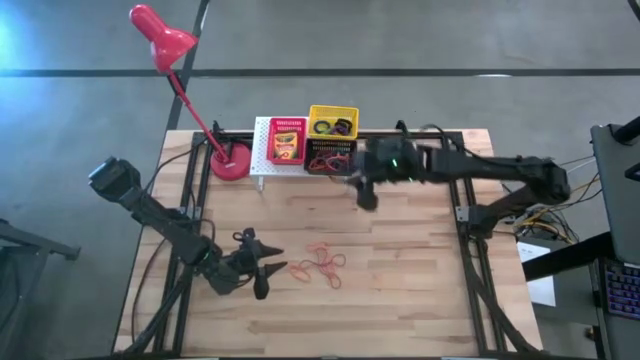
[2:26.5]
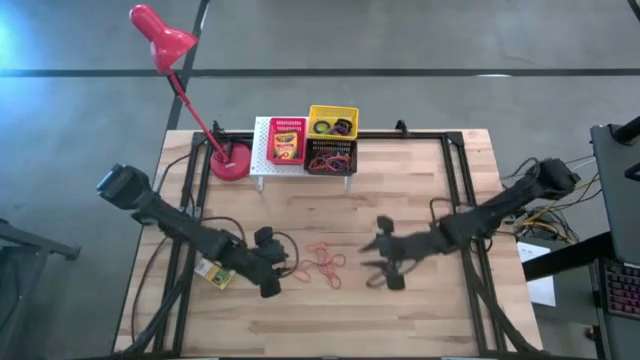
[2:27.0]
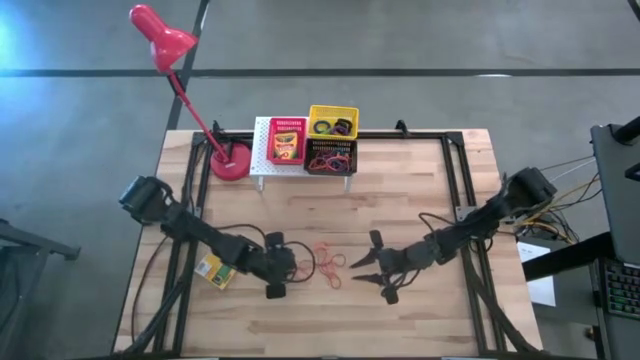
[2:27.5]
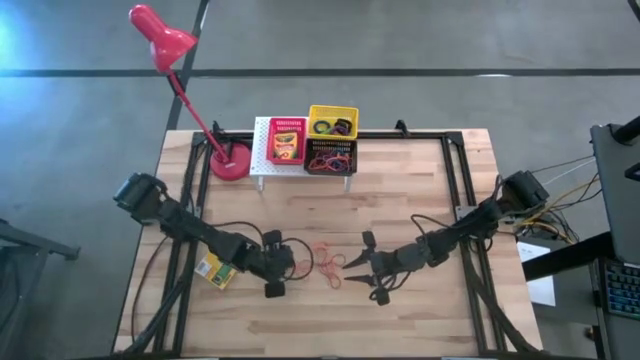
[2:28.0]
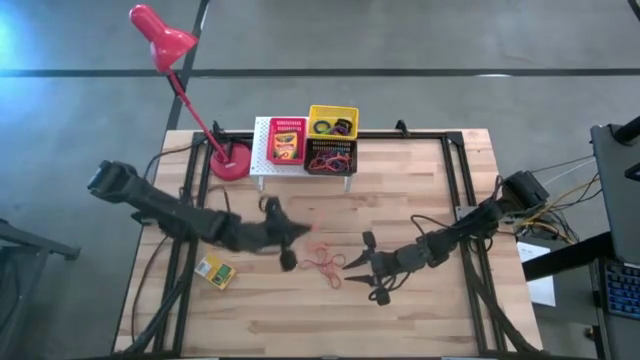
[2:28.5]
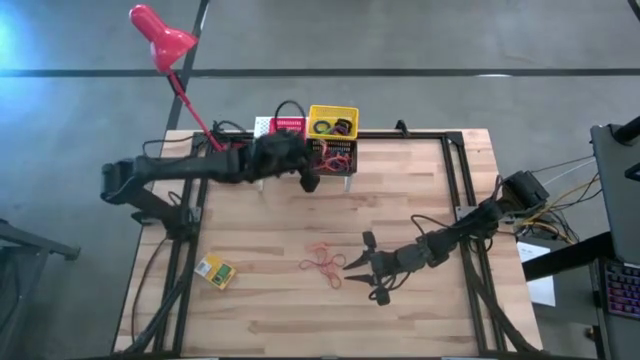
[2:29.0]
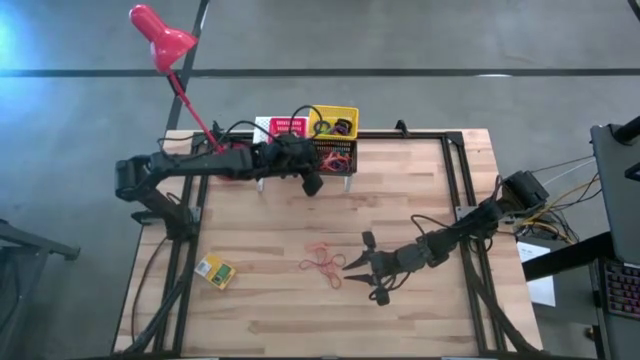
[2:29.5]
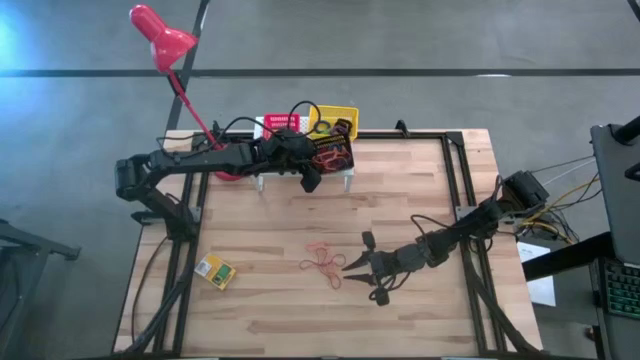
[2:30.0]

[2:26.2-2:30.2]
Task: Pick & Place Office Desk Supplies
Put the orange rubber band into the black bin on the shelf

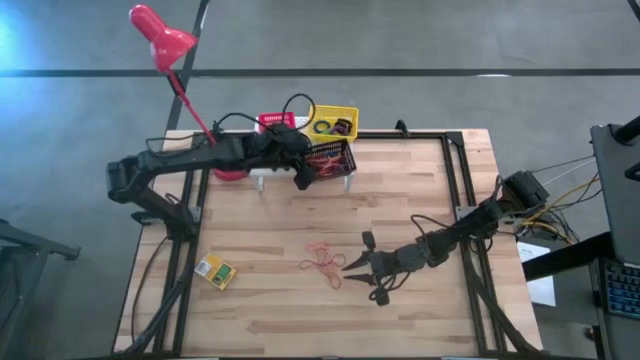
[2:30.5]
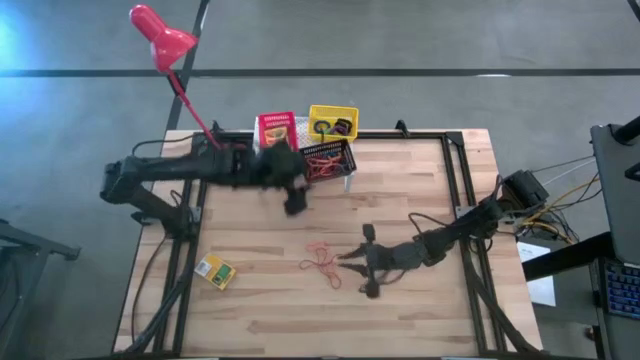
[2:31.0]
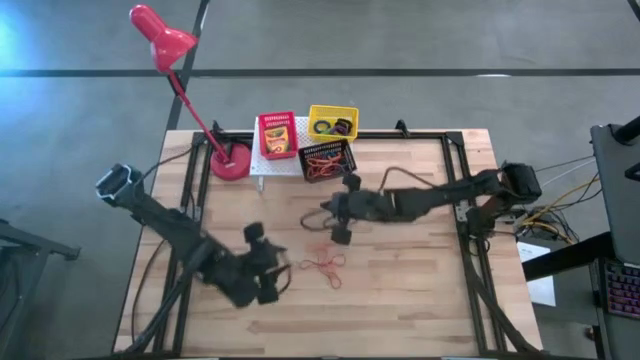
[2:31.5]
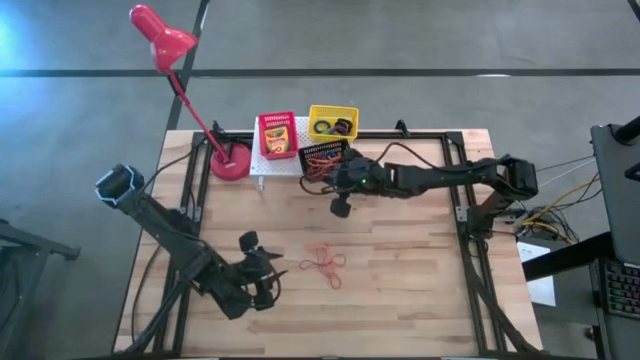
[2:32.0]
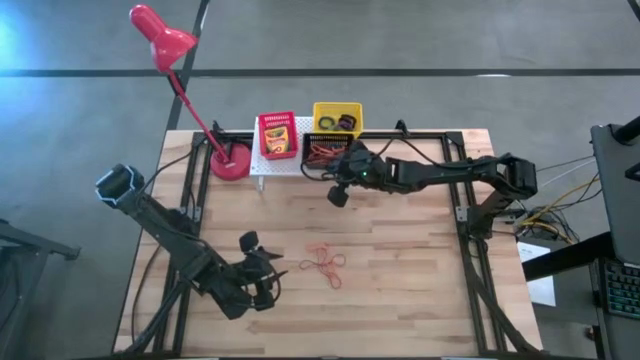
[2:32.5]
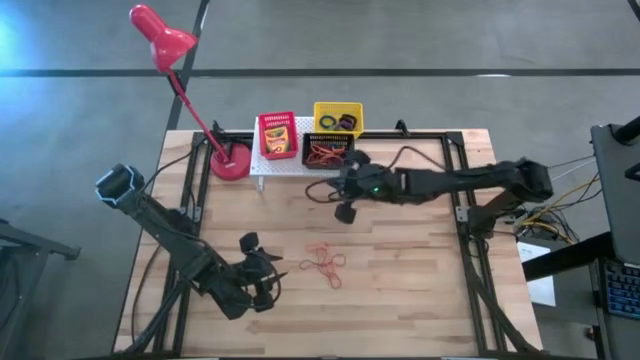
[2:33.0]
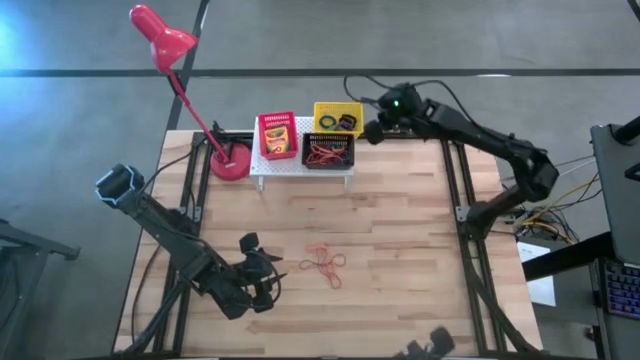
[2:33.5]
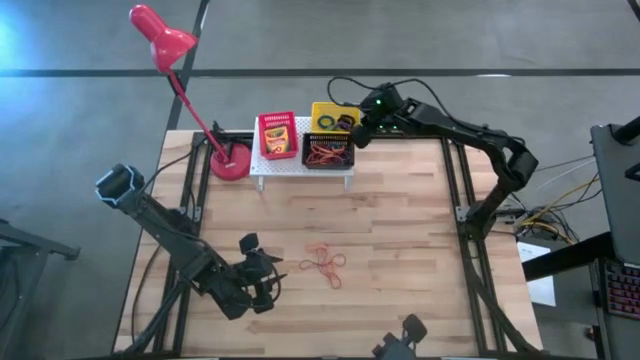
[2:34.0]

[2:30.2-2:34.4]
Adjust the bins on the shelf

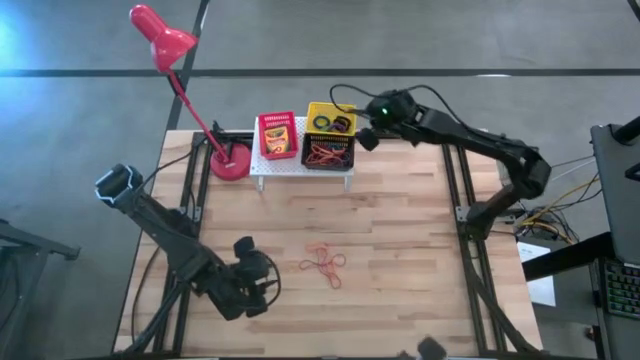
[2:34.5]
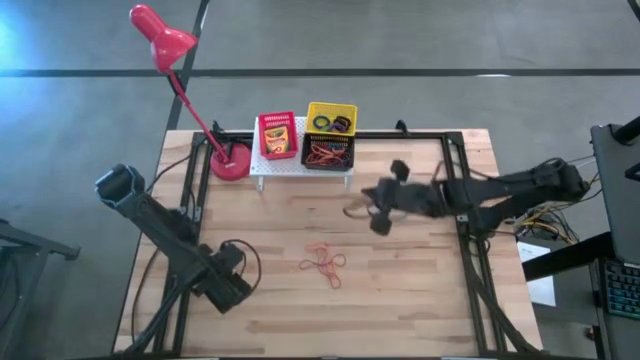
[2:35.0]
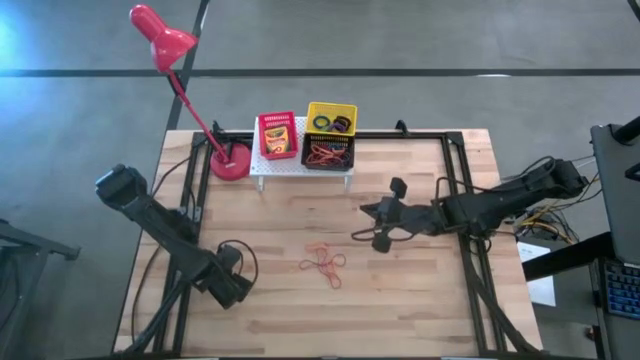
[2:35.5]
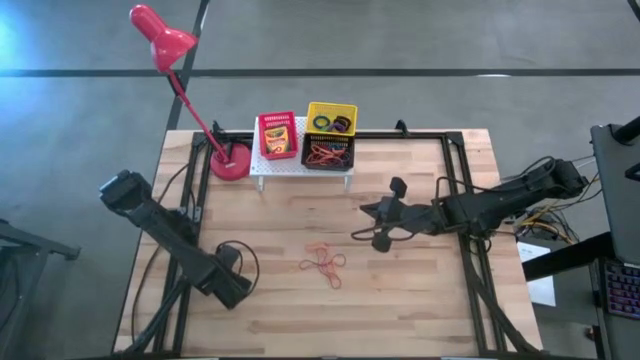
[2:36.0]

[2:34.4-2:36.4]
Put the yellow crayon box into the red bin on the shelf

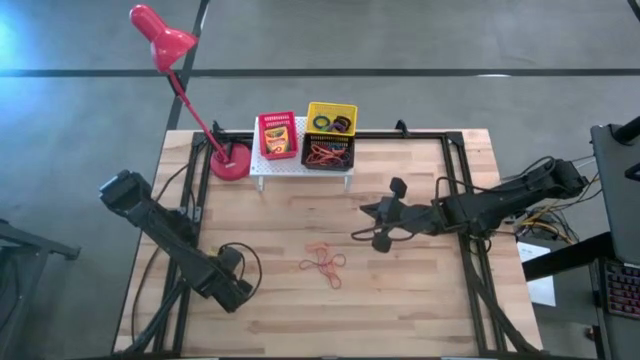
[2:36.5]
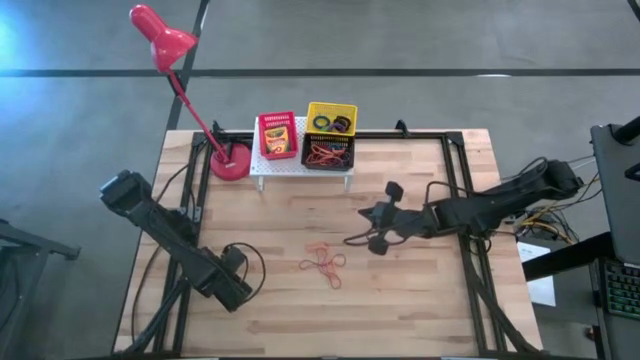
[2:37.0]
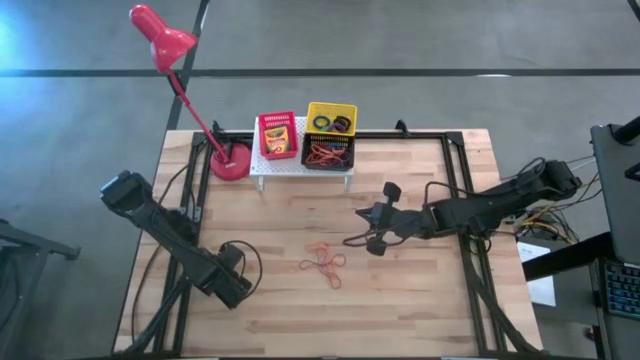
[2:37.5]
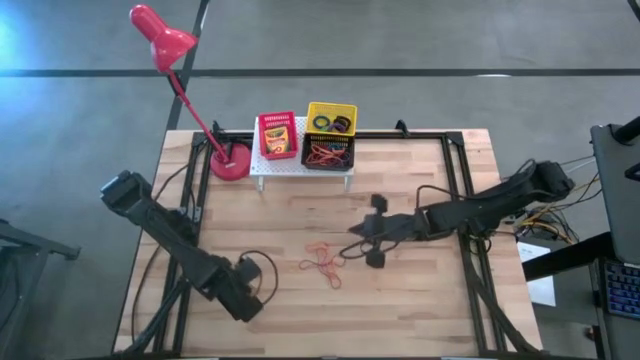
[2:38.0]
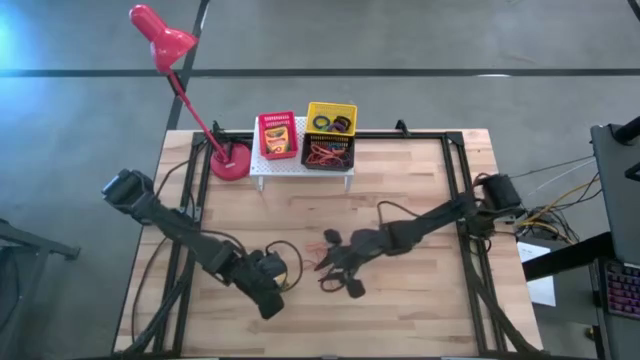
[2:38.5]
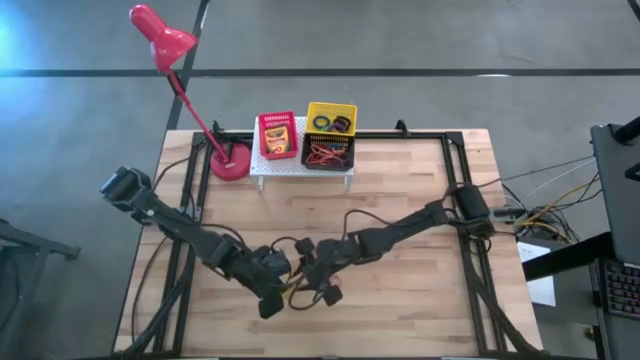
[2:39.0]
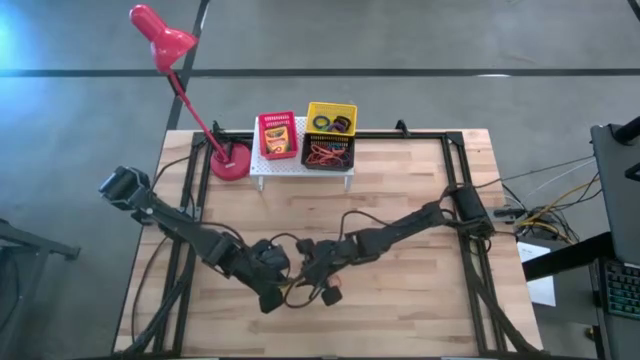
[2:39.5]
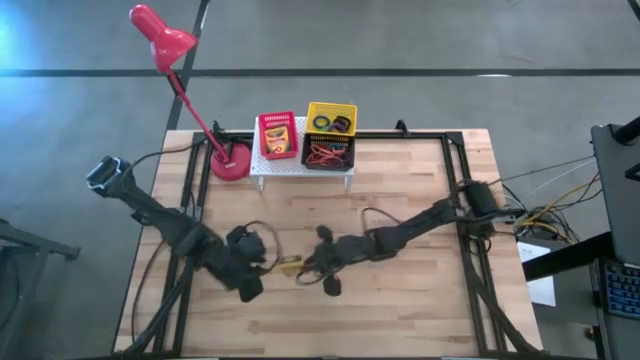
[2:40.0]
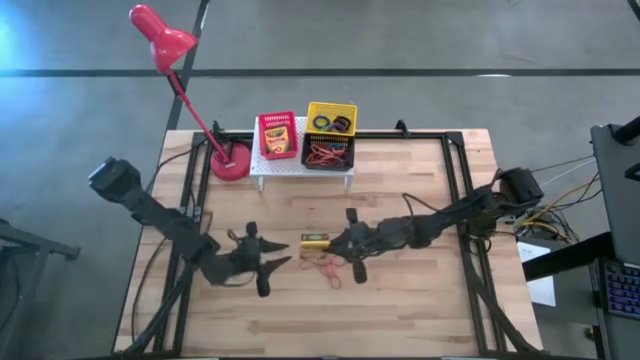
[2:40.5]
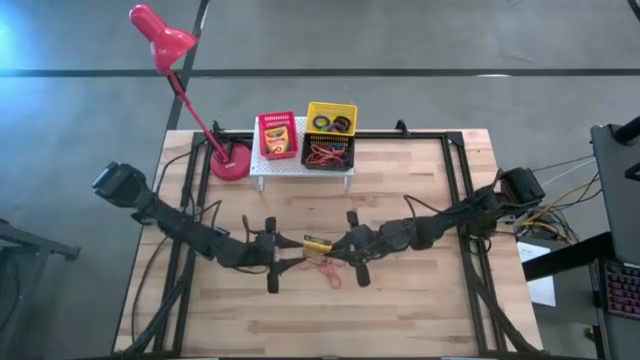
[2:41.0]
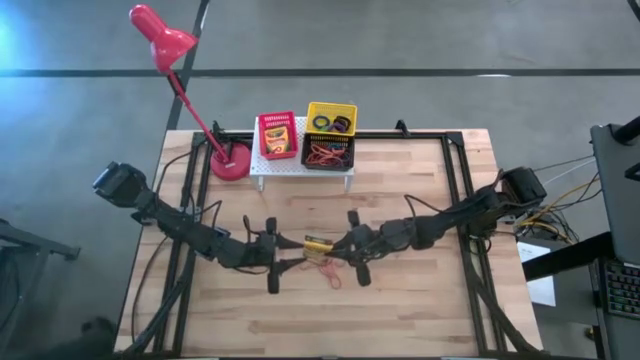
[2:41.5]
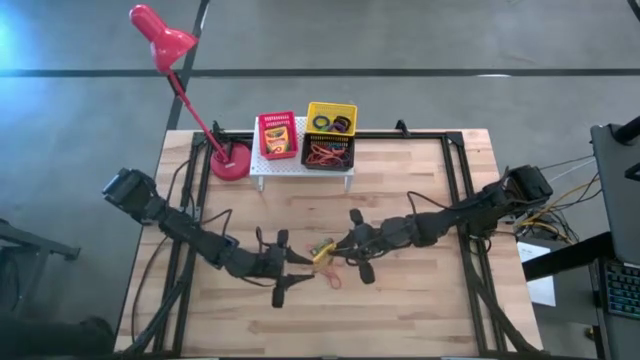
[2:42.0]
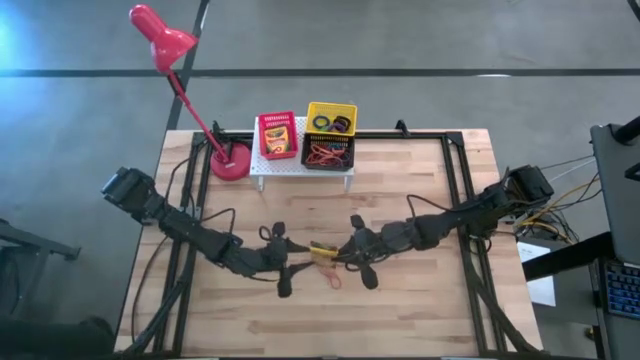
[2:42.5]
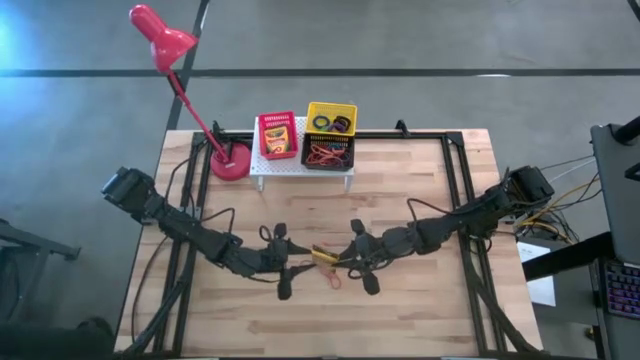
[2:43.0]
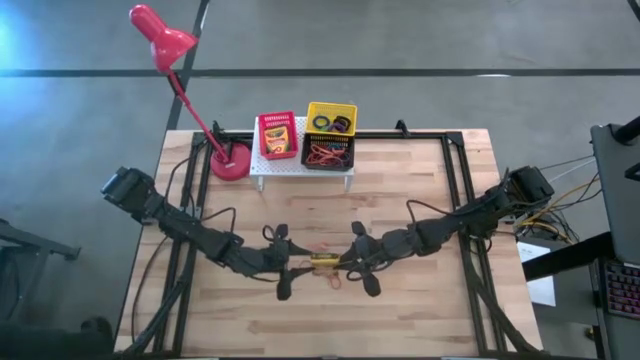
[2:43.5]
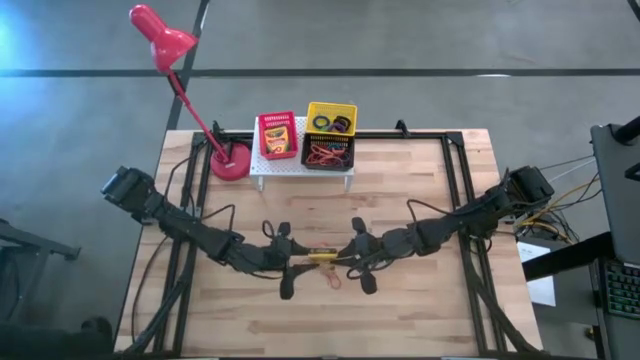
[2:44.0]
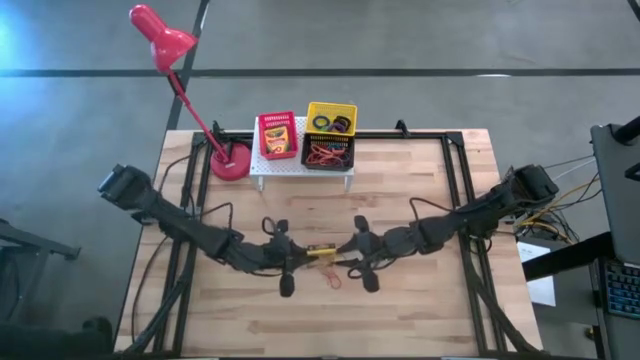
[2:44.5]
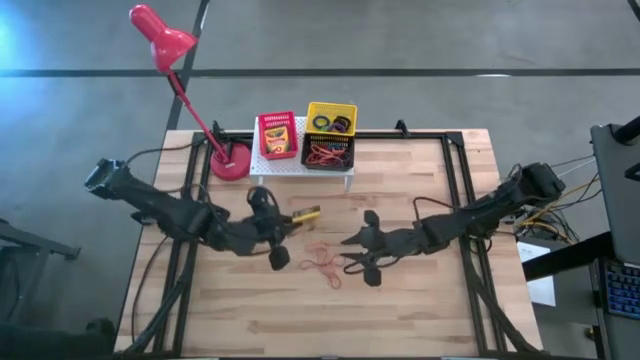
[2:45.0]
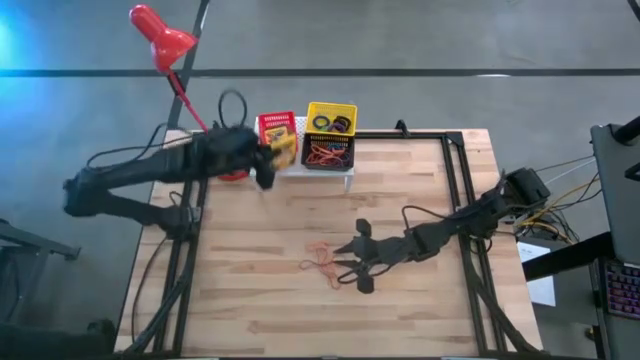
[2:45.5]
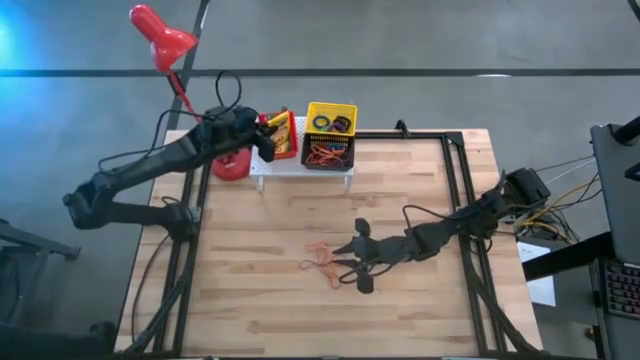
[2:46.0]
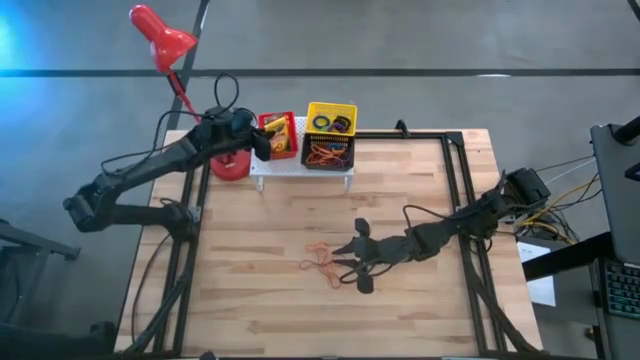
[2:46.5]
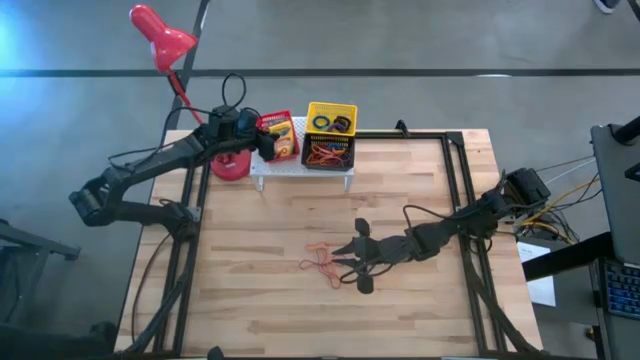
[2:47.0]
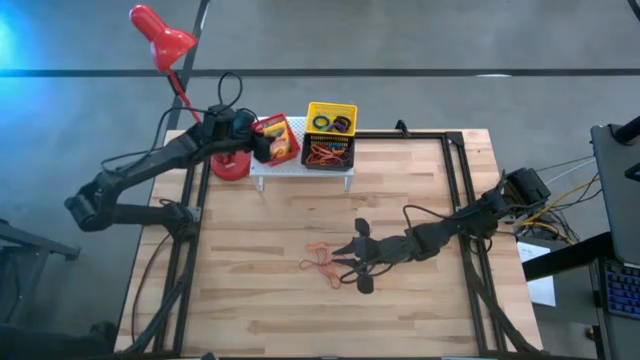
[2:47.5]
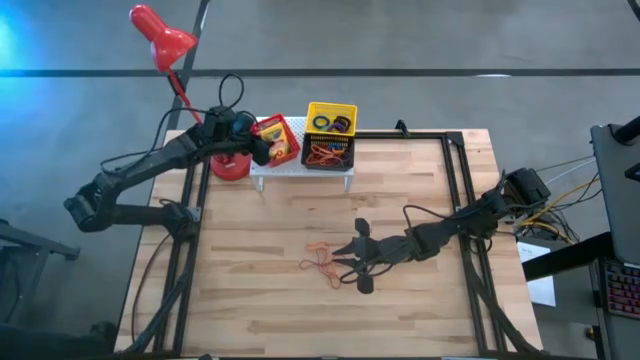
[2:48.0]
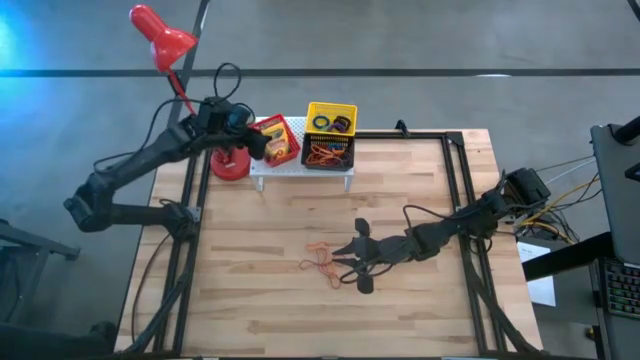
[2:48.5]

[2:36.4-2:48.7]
Put the yellow crayon box into the red bin on the shelf
